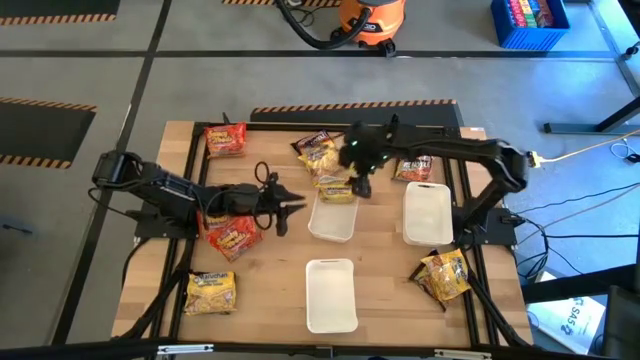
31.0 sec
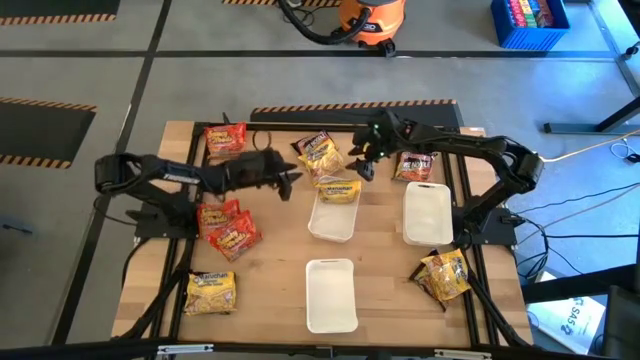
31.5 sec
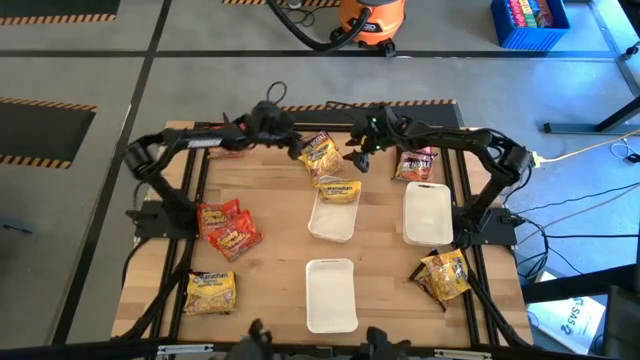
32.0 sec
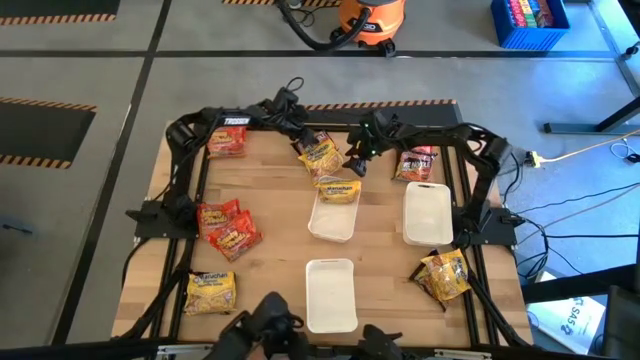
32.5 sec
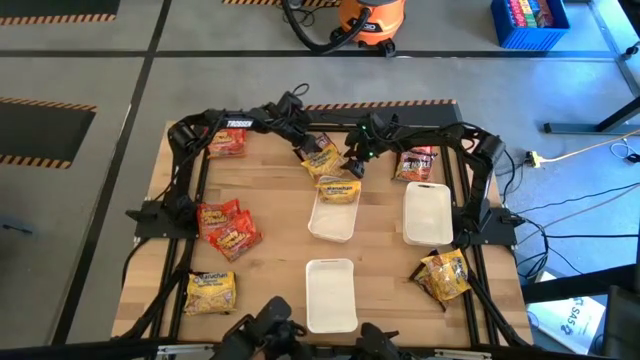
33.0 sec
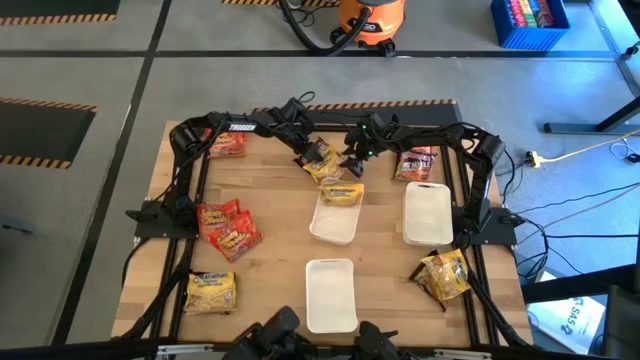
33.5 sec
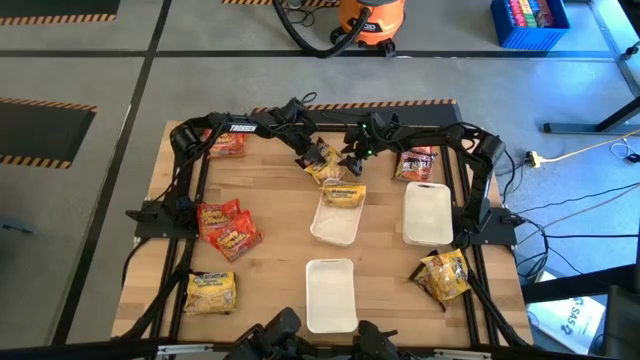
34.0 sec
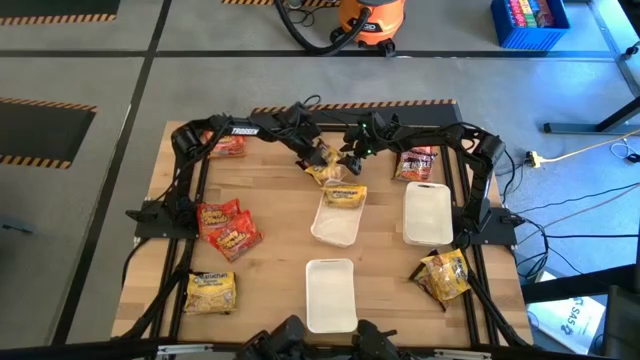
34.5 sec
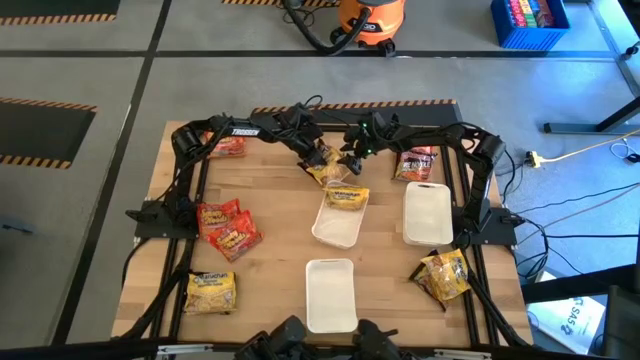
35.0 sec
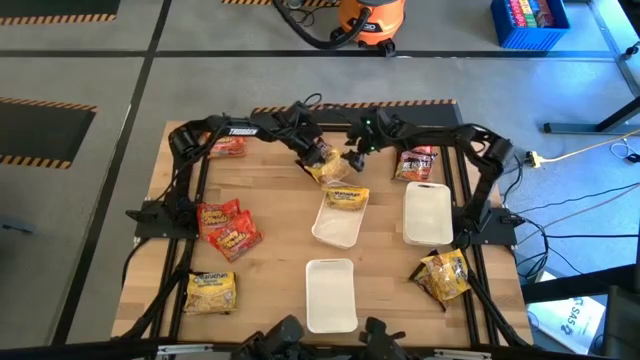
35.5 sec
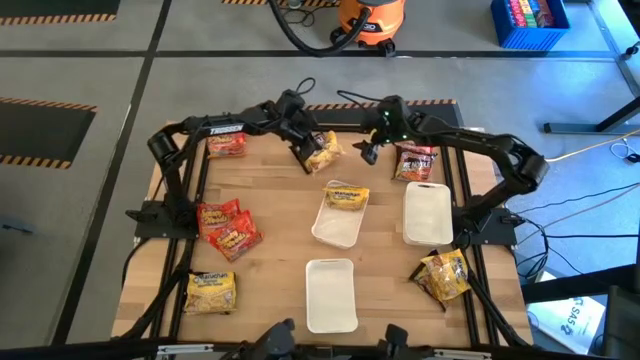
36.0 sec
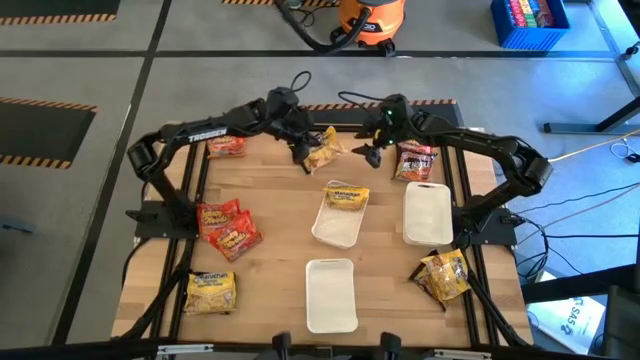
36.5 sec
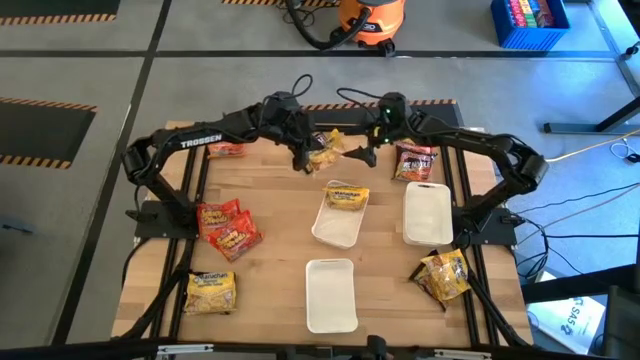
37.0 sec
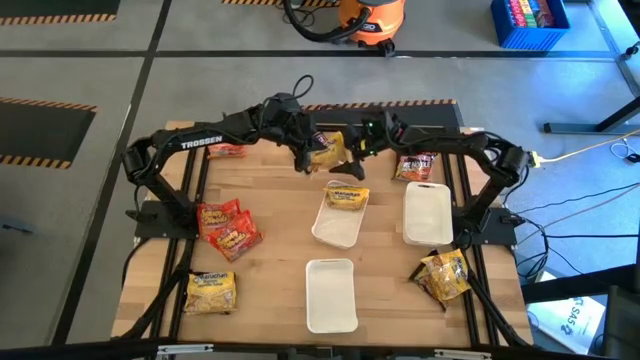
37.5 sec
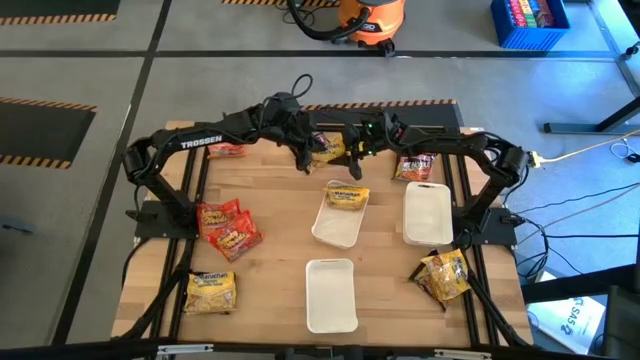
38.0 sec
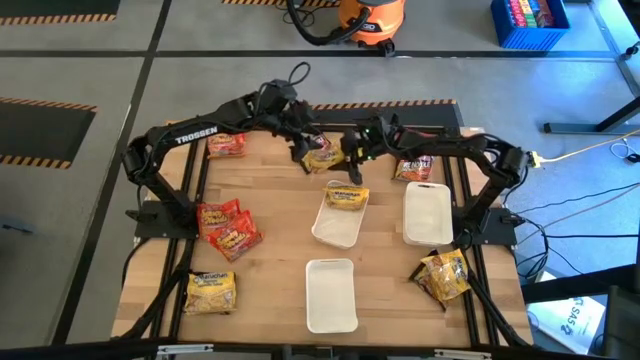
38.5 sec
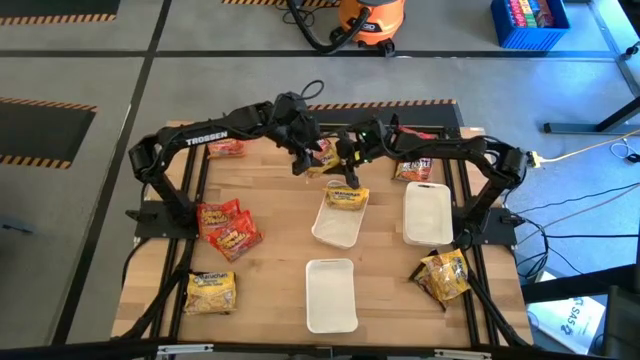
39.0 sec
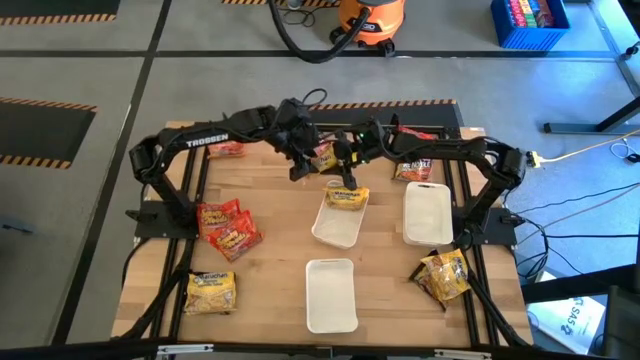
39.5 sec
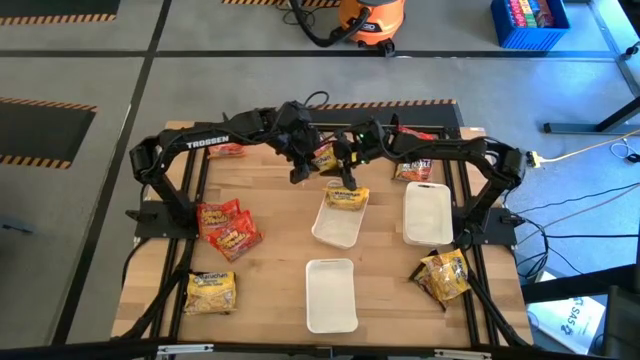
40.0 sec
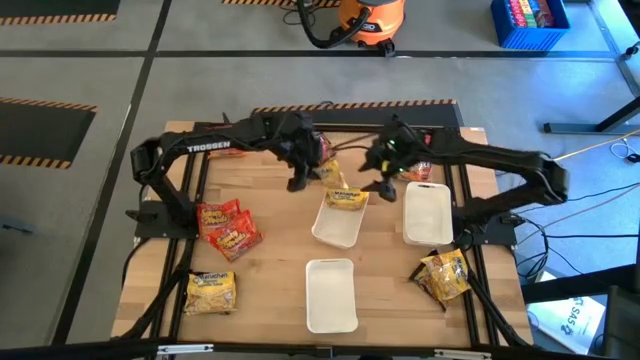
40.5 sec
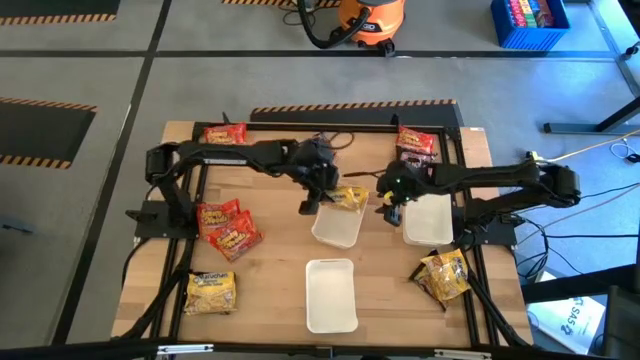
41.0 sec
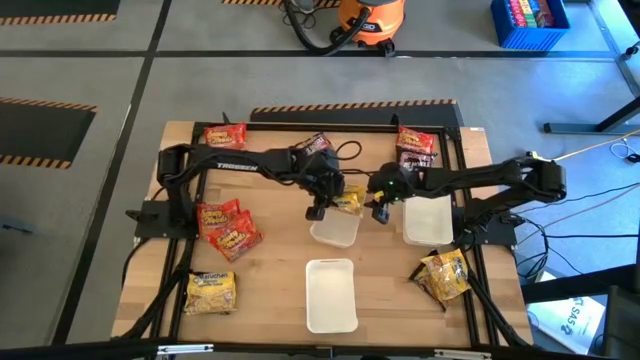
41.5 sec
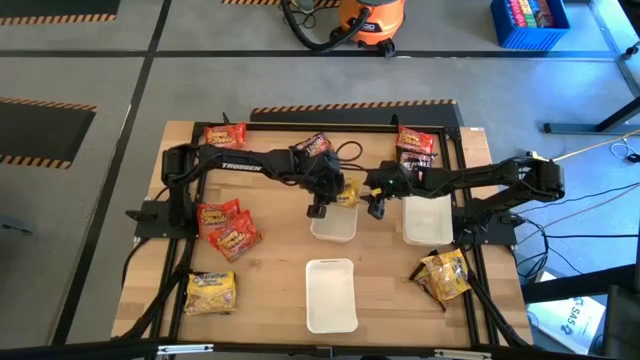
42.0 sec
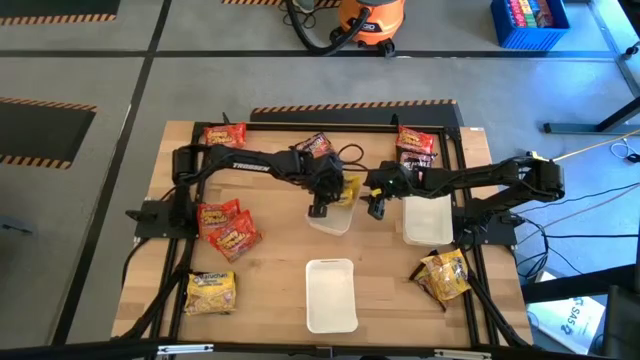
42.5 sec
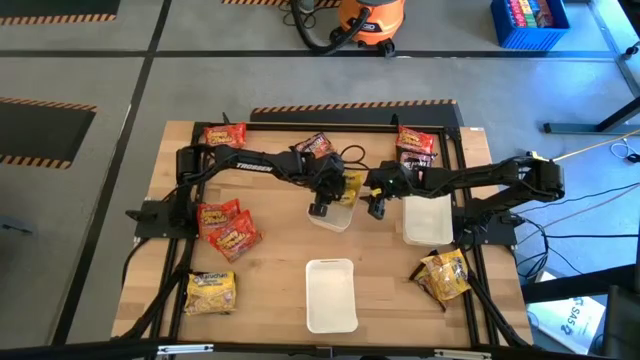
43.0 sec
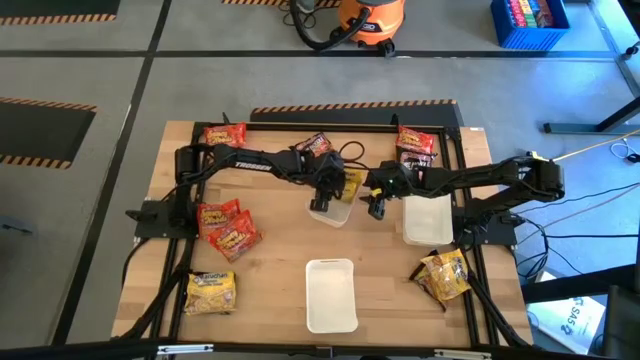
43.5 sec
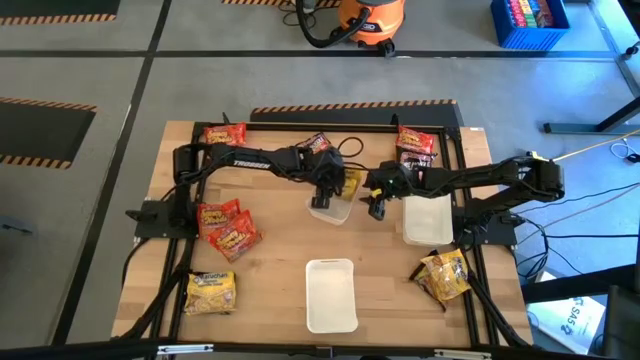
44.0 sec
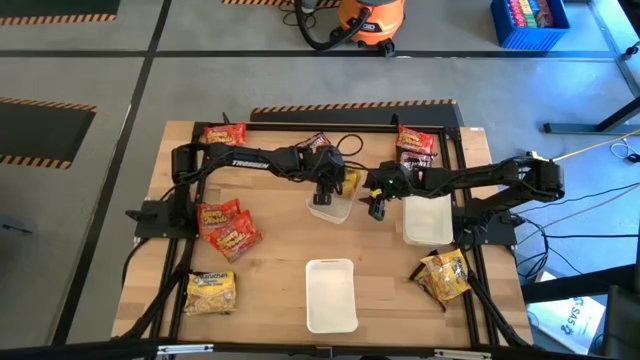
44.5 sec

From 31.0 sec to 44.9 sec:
Task: Sort Maruchan noodles
Put the top yellow noodle pack in the top left white bin

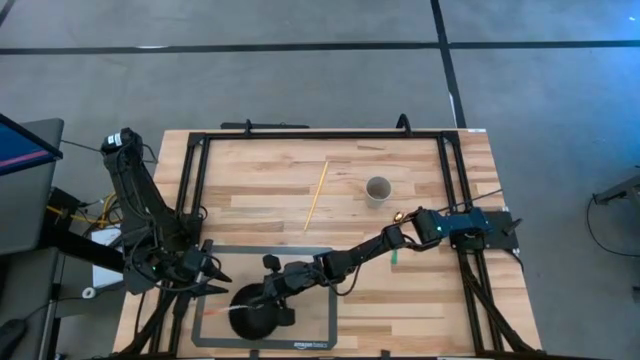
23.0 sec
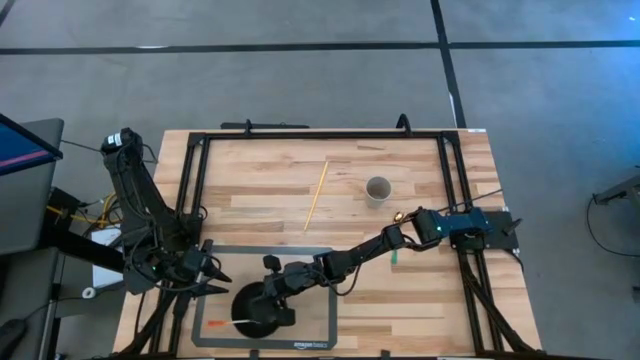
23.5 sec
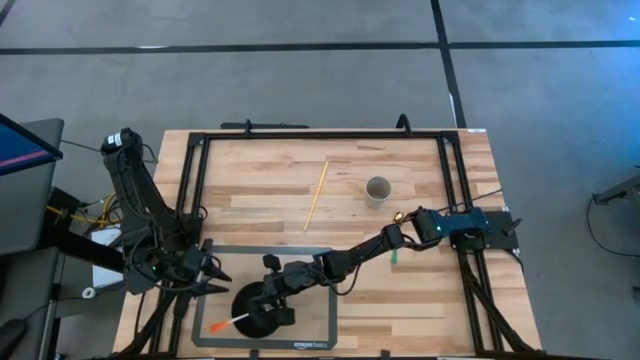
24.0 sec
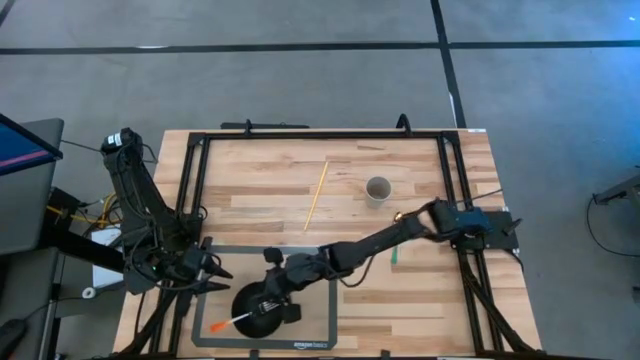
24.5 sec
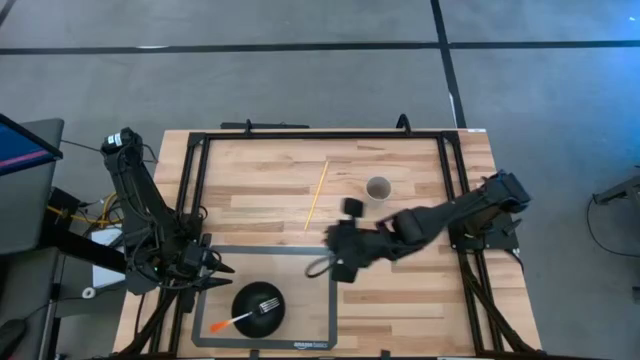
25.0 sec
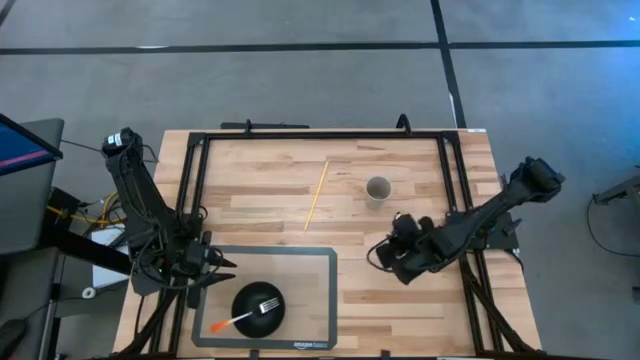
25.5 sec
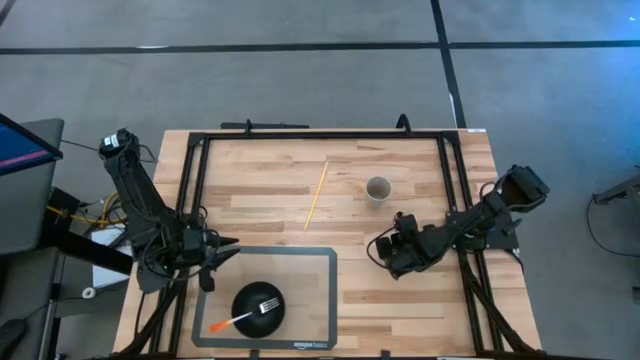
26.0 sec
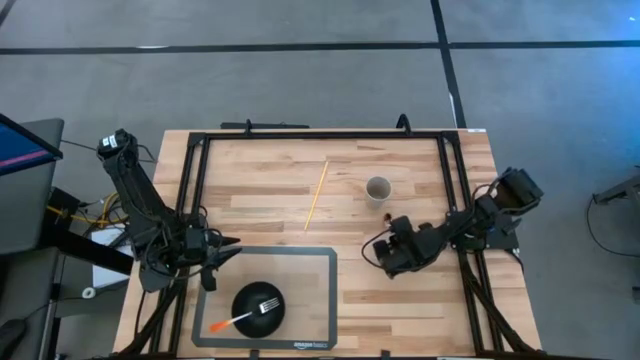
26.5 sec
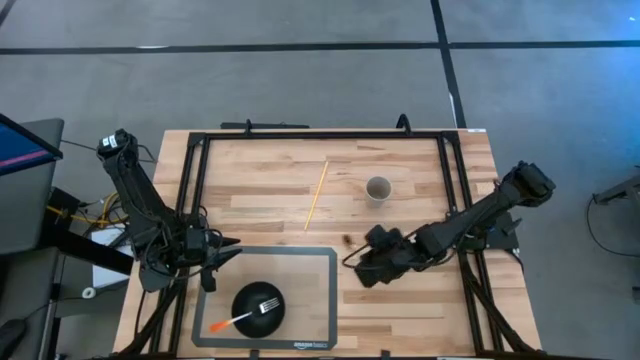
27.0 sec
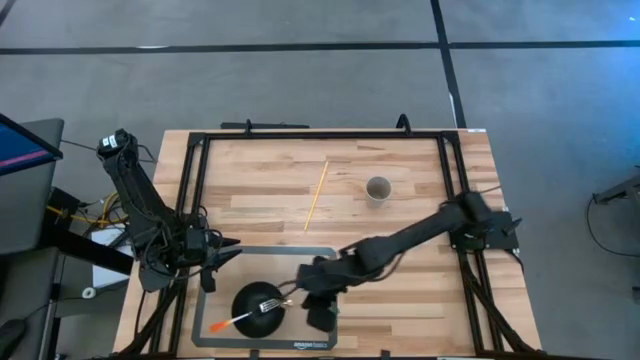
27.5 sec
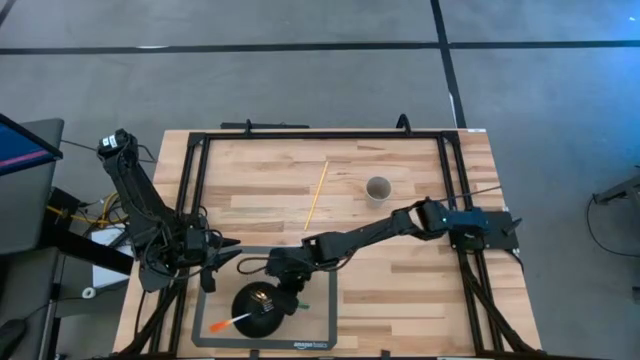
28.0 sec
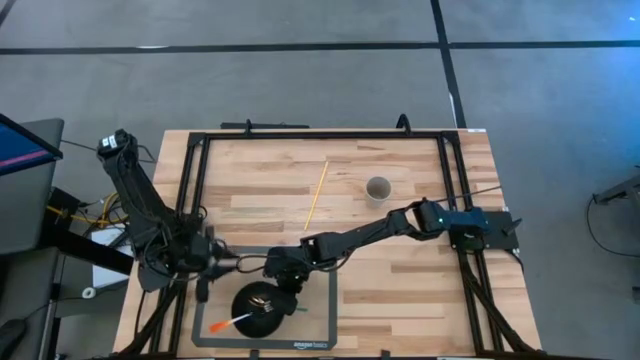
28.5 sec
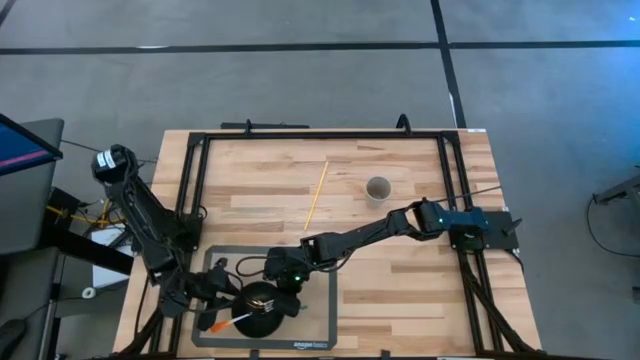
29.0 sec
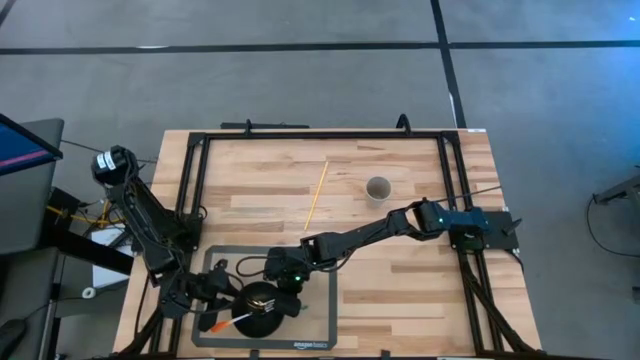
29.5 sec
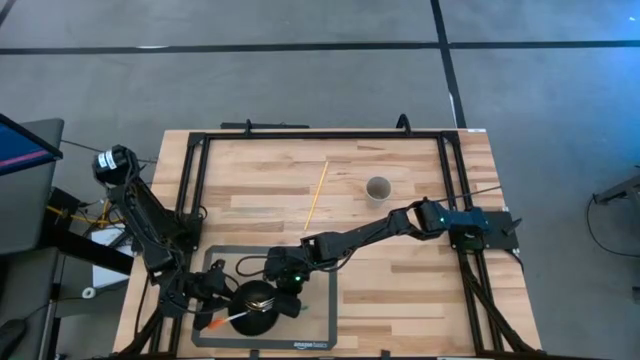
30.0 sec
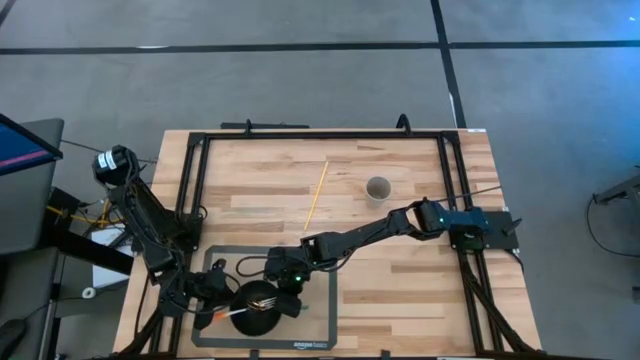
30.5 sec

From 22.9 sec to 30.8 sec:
Task: Pick & Place Utensil
Put the green spoon into the black bowl on the transparent mat
